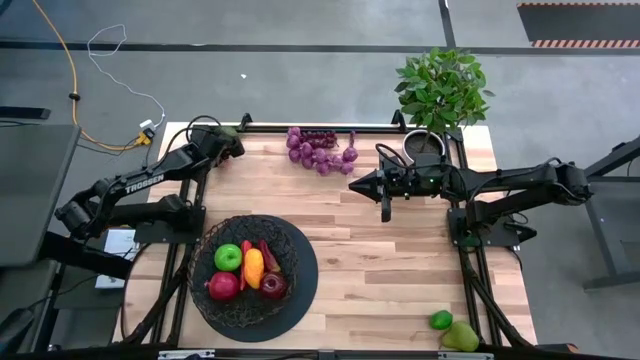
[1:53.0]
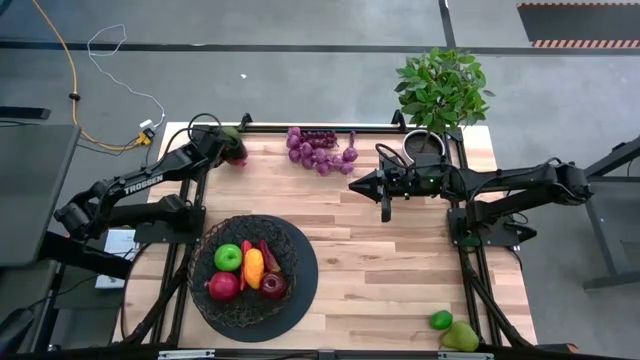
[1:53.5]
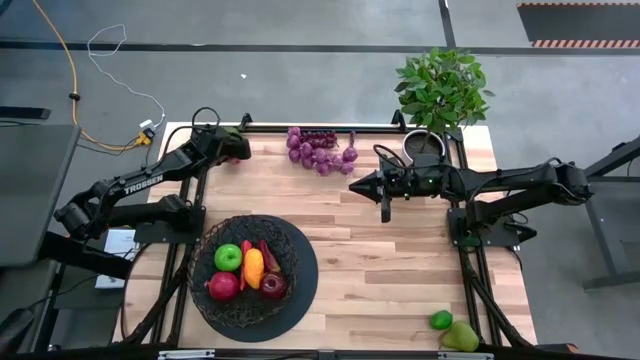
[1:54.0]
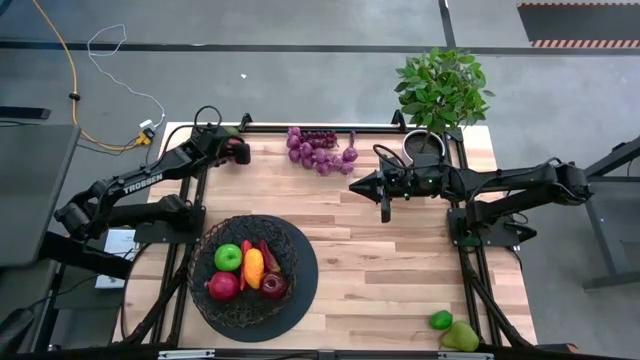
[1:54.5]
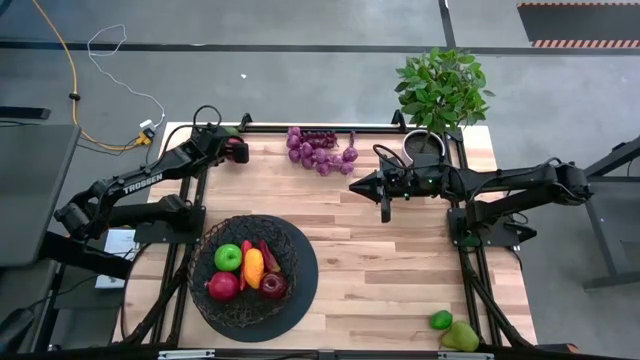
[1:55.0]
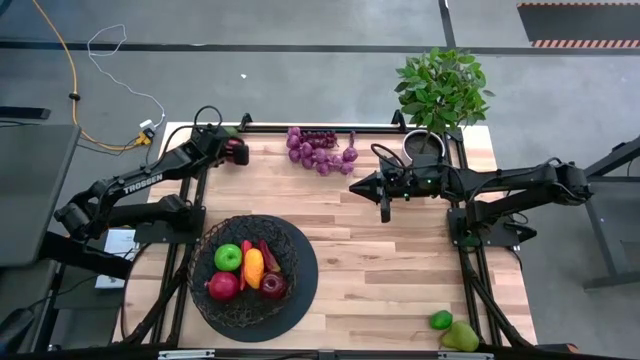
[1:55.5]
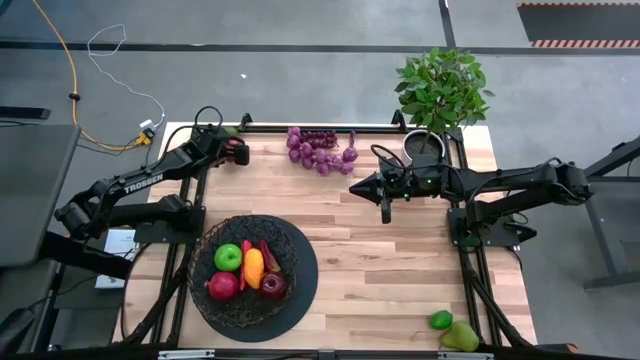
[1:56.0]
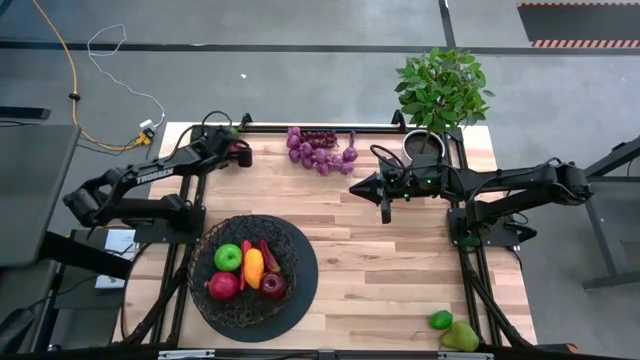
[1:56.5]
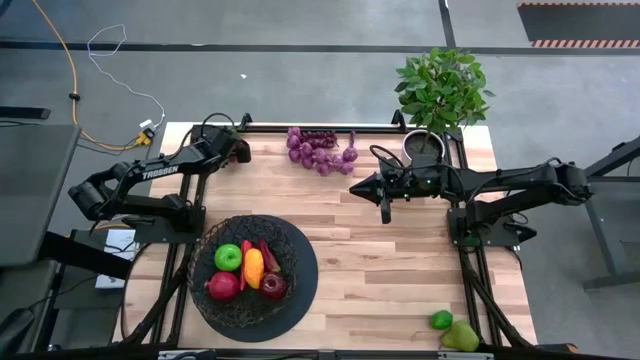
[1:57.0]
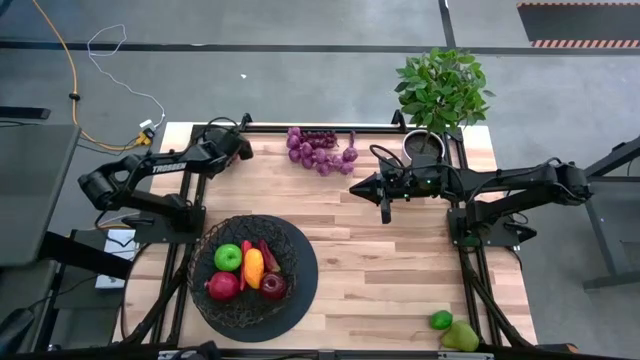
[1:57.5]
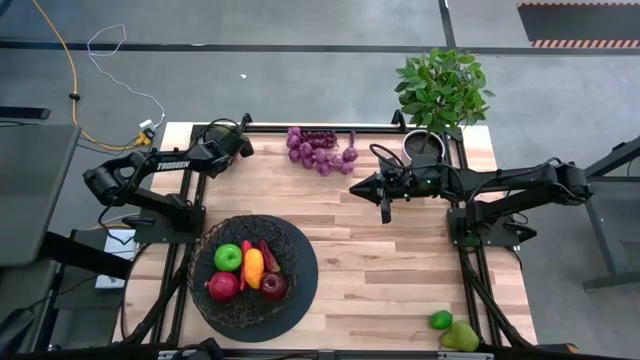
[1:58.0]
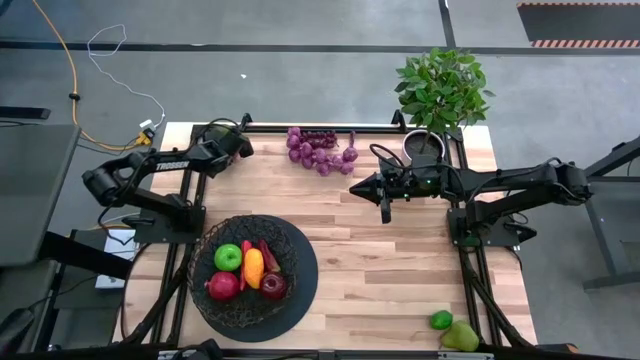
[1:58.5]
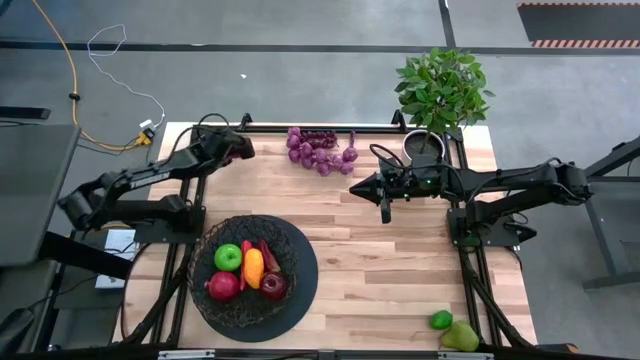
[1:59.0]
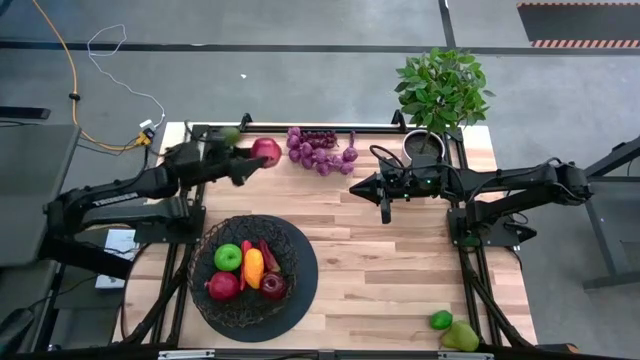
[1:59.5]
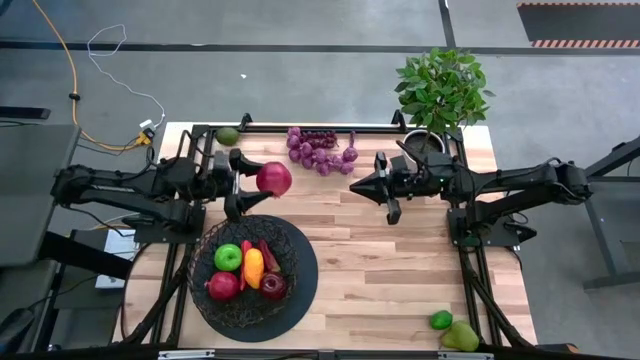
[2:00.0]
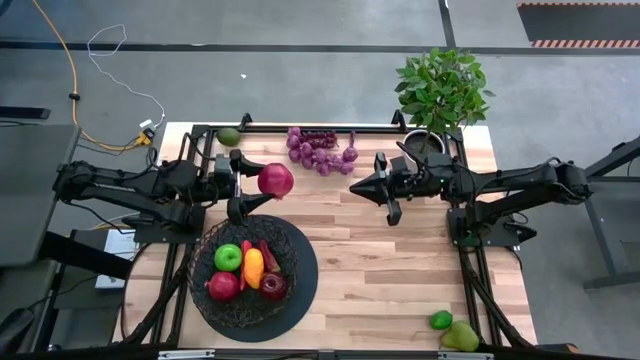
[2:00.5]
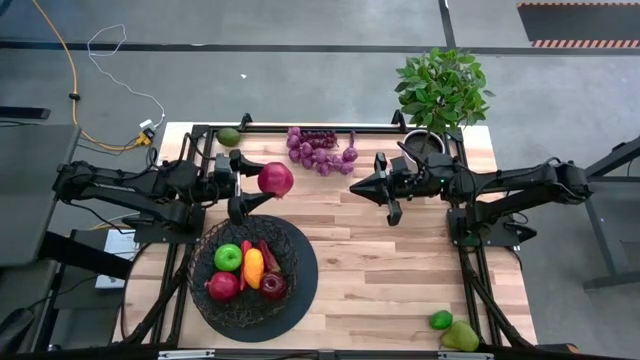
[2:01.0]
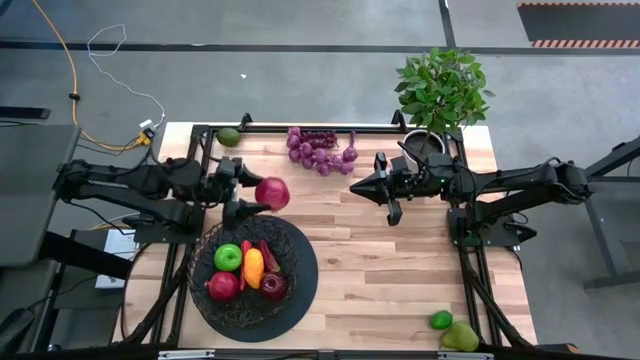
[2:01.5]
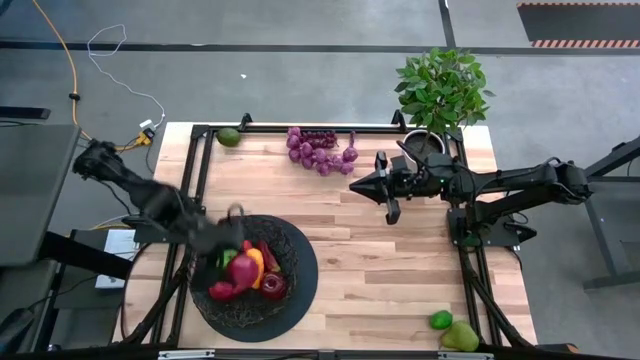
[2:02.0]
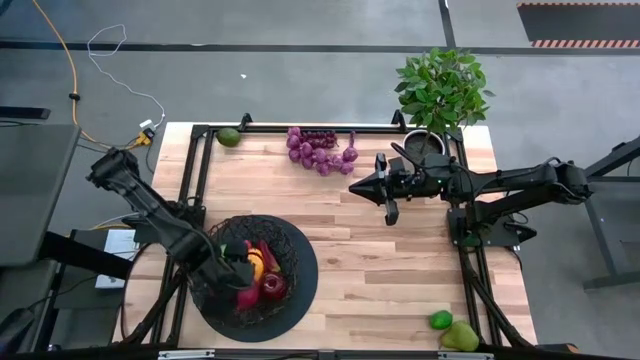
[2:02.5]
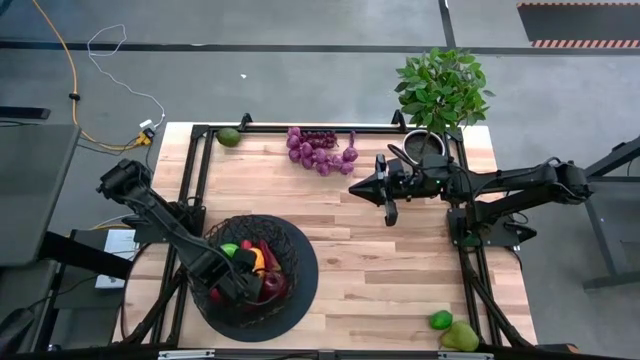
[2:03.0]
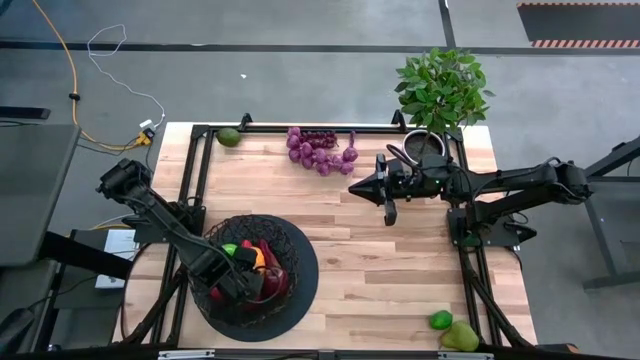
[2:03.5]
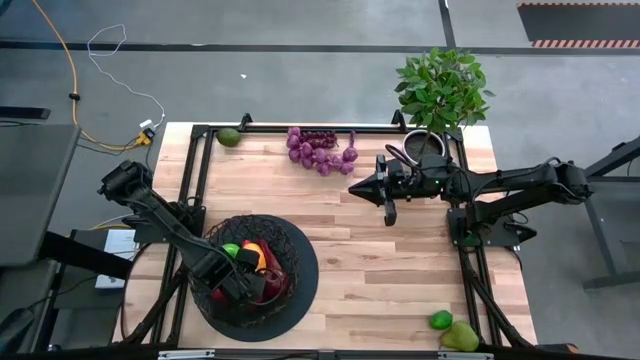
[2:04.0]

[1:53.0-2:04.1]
Task: Build produce basket
Put the pomegranate into the black basket

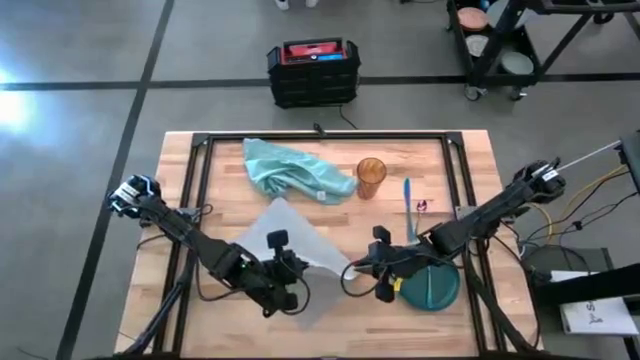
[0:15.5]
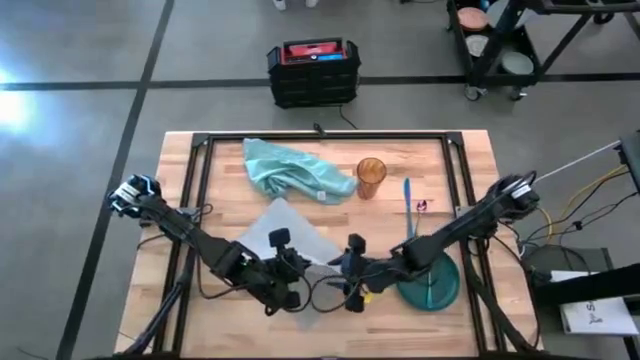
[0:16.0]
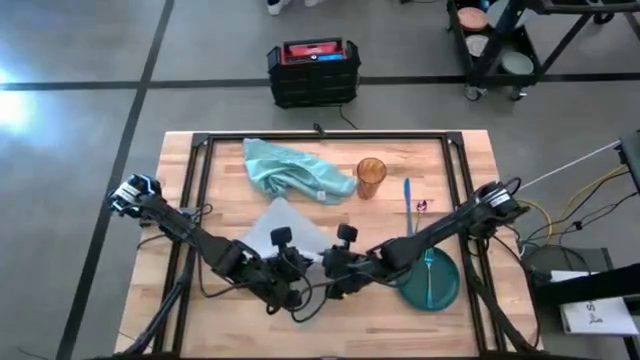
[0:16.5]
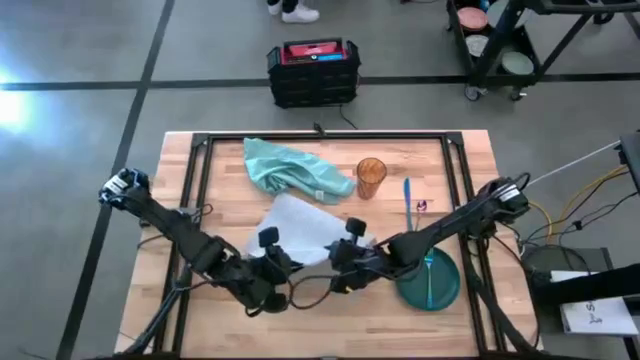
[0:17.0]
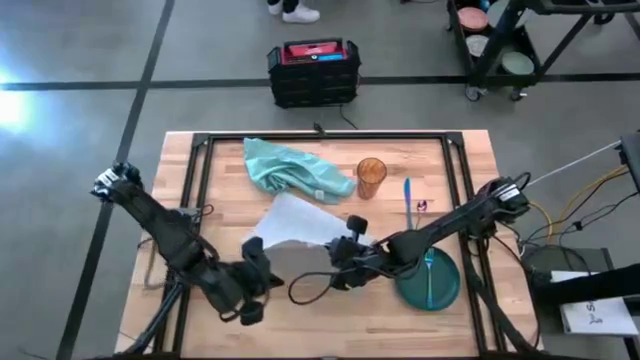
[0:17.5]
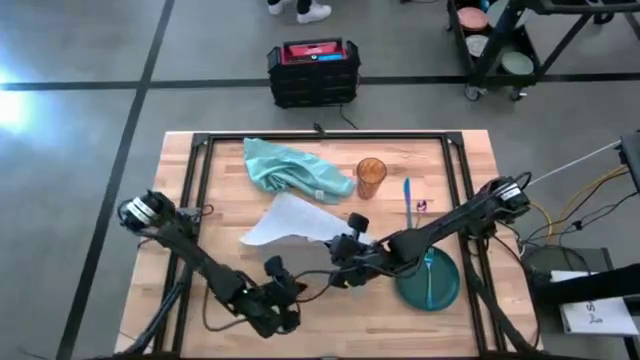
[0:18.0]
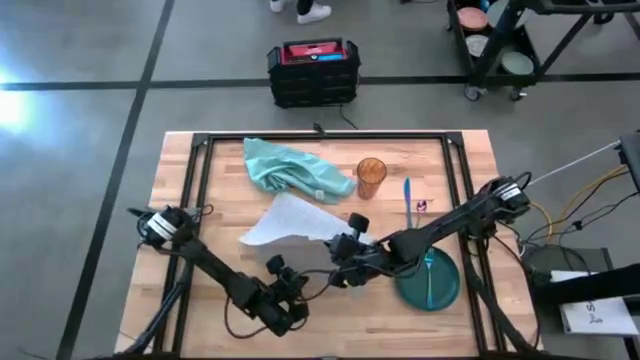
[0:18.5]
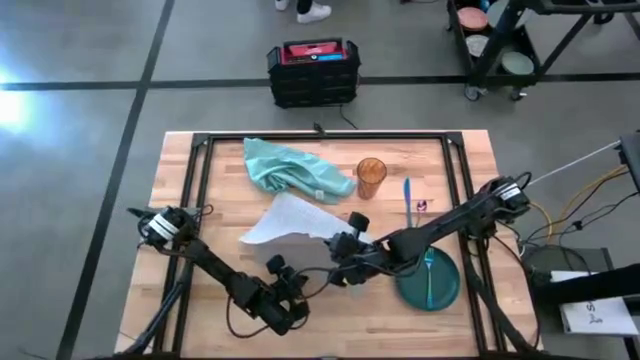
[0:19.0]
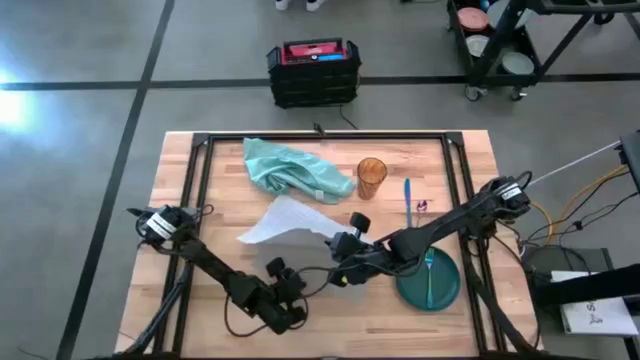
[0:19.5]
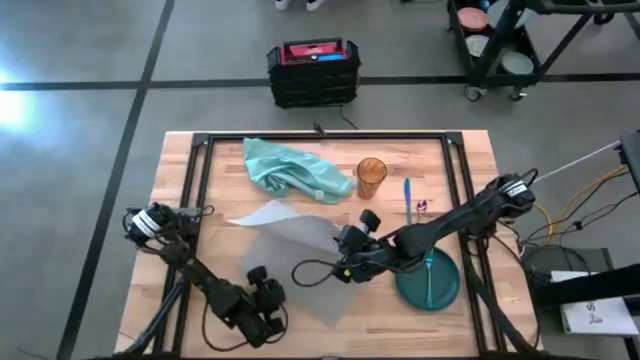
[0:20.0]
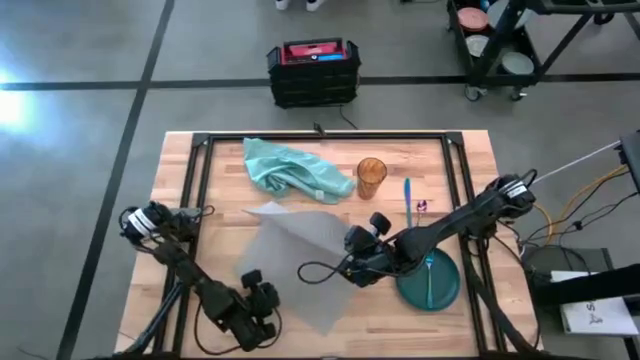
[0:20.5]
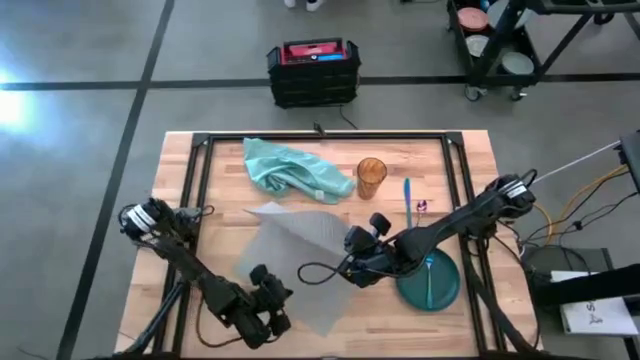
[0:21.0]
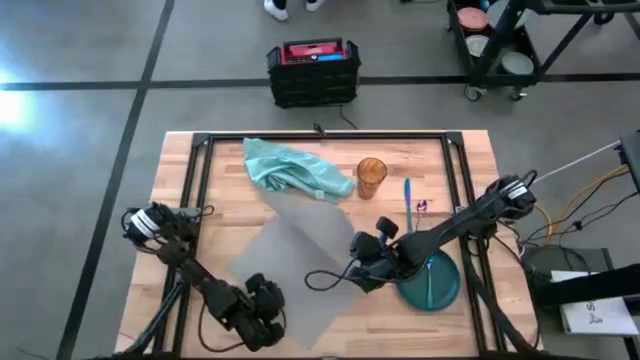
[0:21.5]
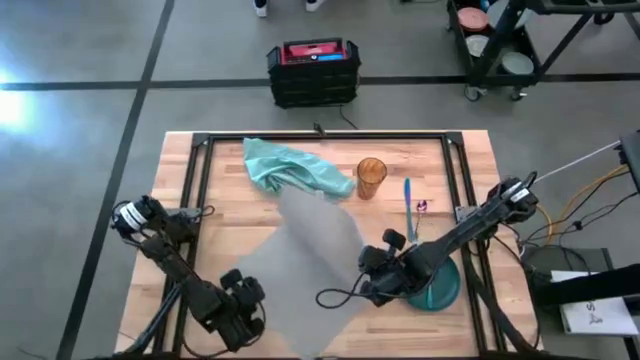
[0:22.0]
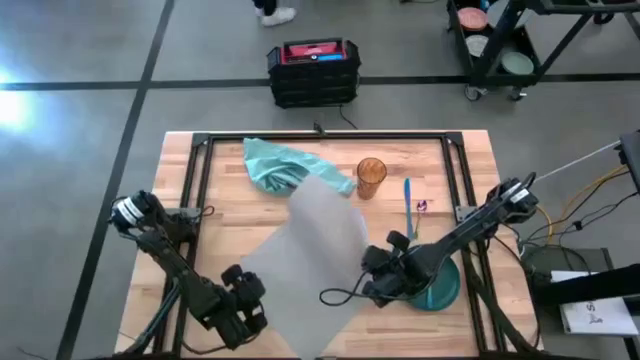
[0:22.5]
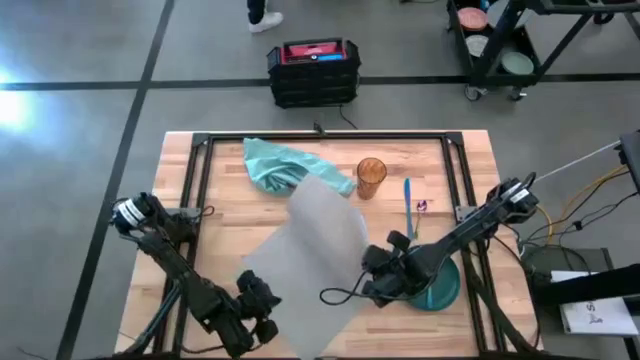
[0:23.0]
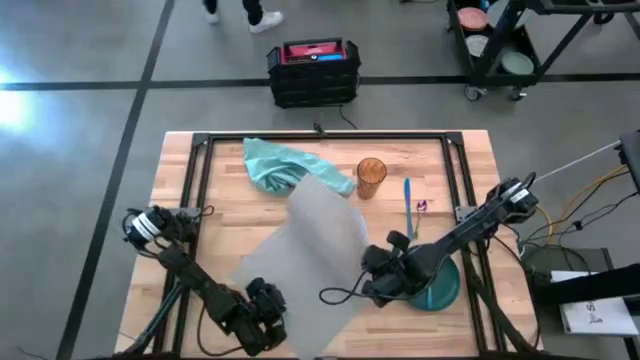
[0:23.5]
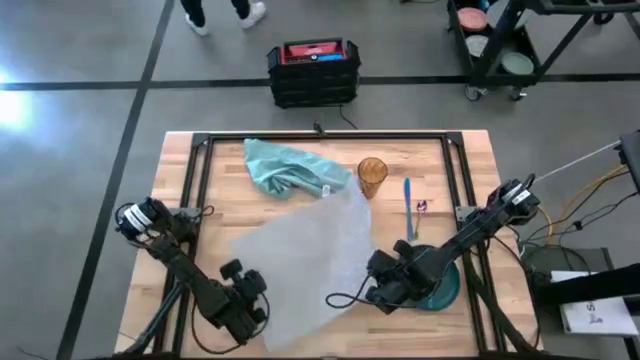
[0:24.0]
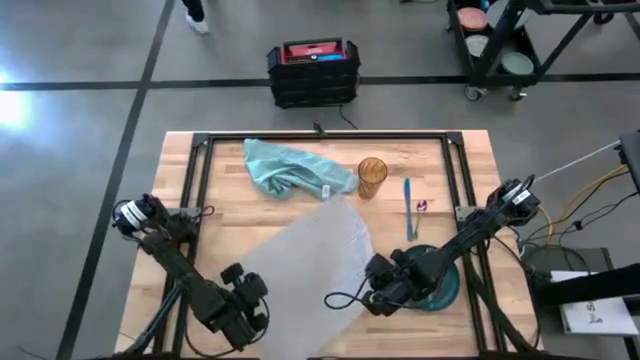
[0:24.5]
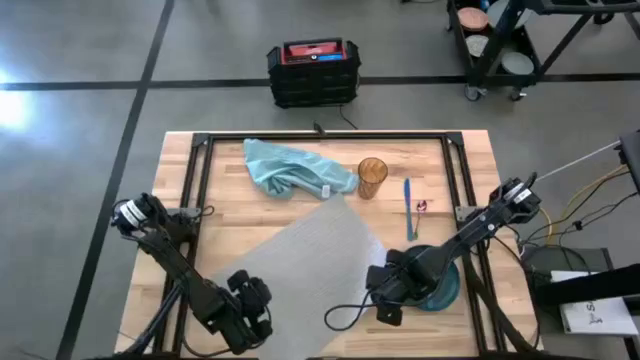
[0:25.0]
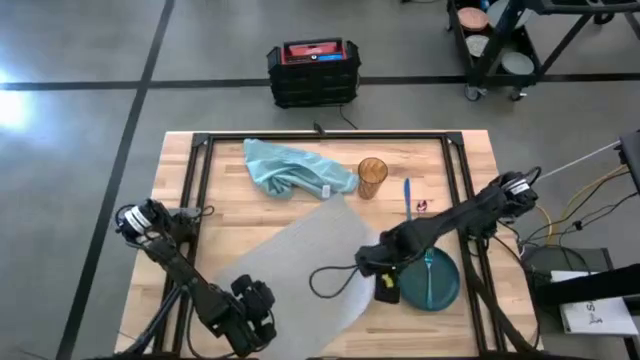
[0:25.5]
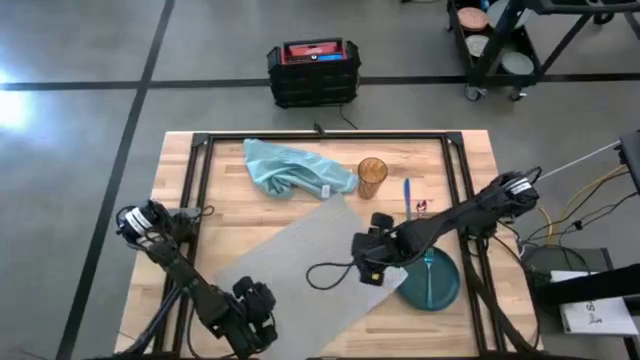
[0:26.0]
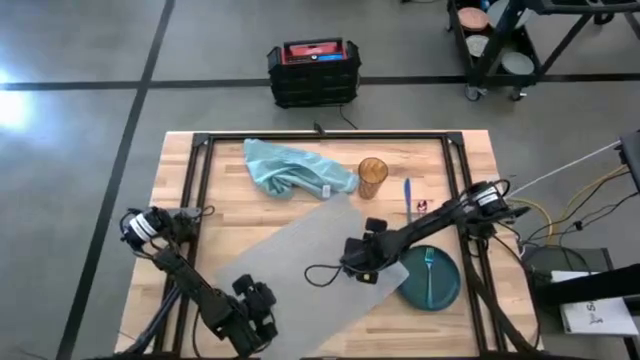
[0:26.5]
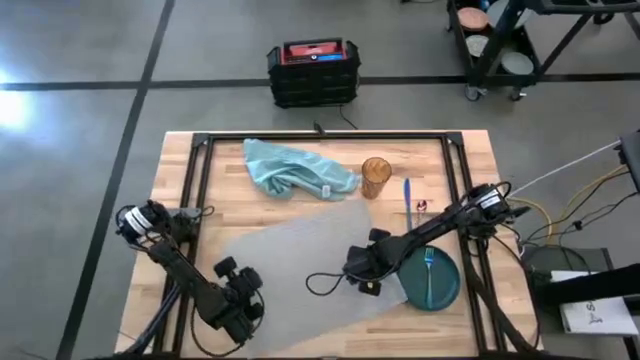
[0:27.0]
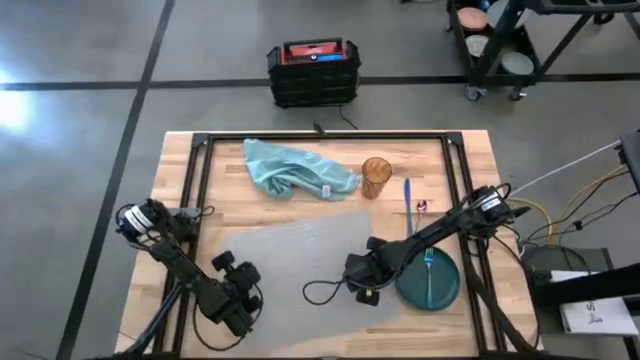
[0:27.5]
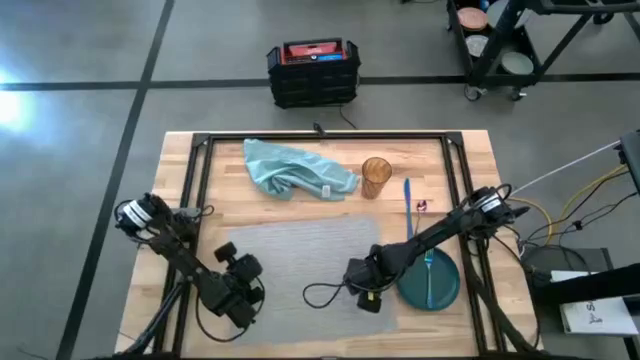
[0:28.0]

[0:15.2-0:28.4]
Task: Set table place
Prepare the gray table mat
